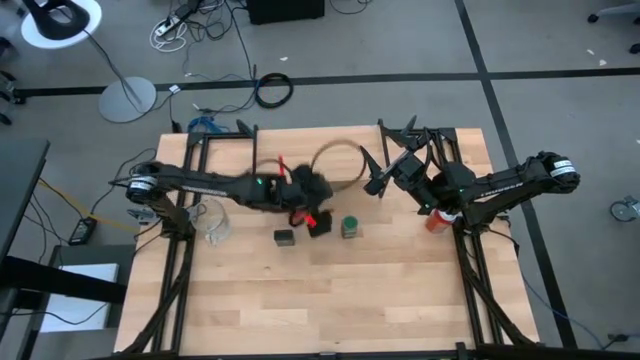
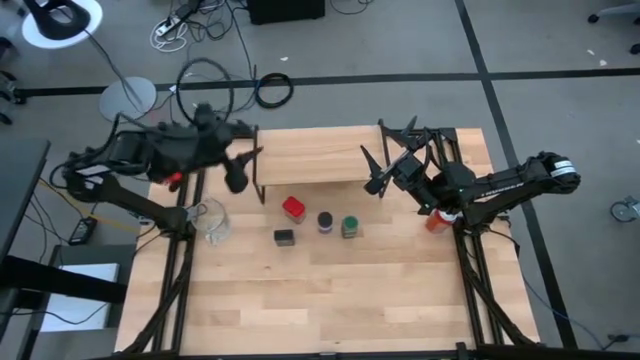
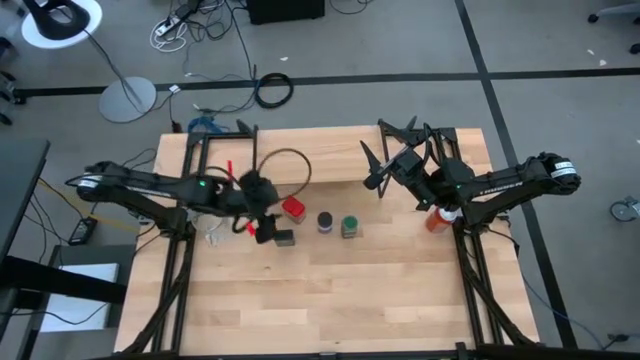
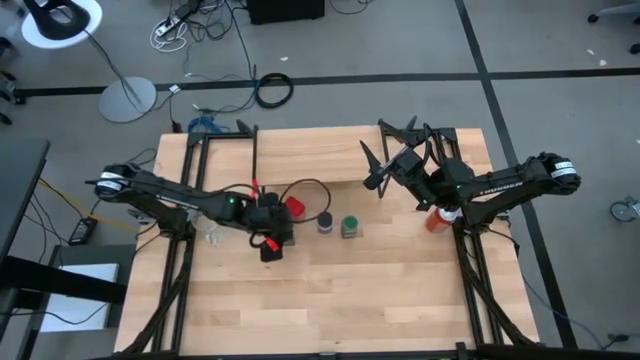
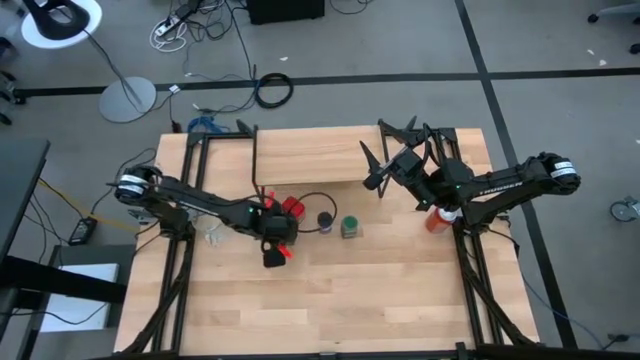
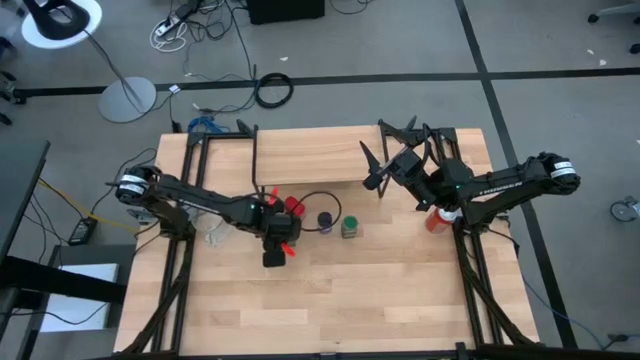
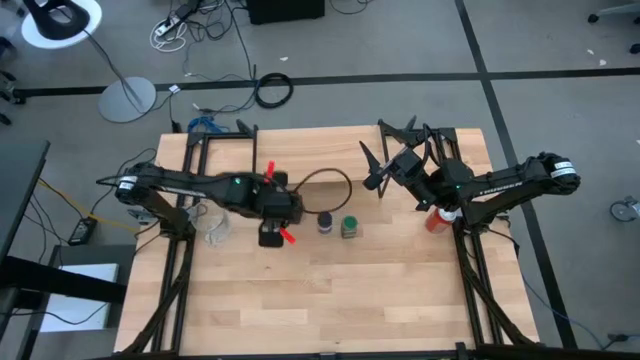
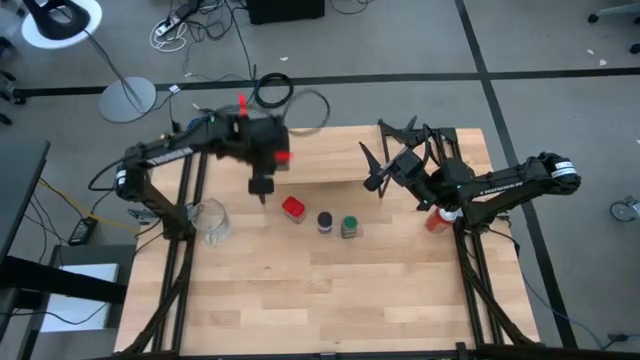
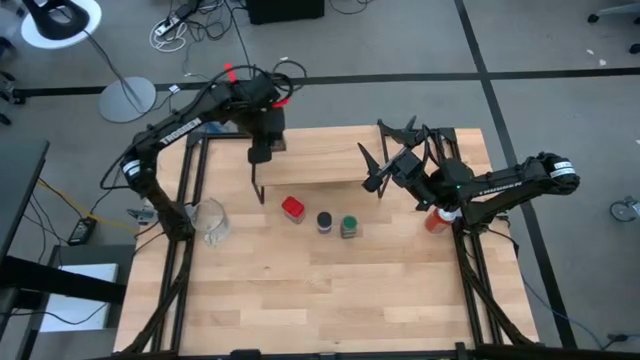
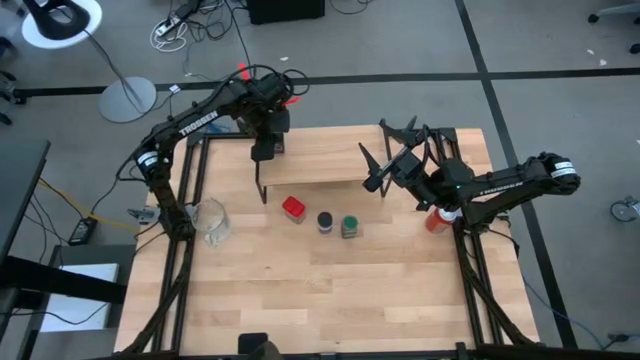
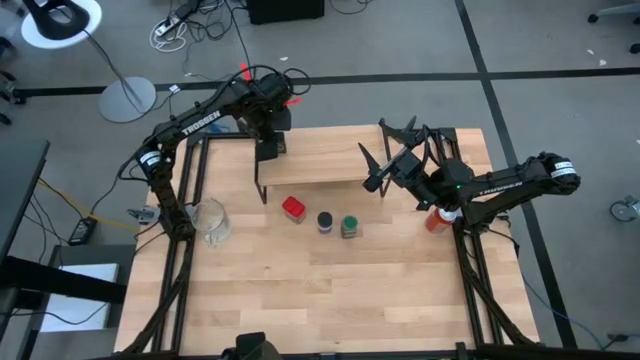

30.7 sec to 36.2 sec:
Task: Shelf spices
Put the black seasoning can on the shelf

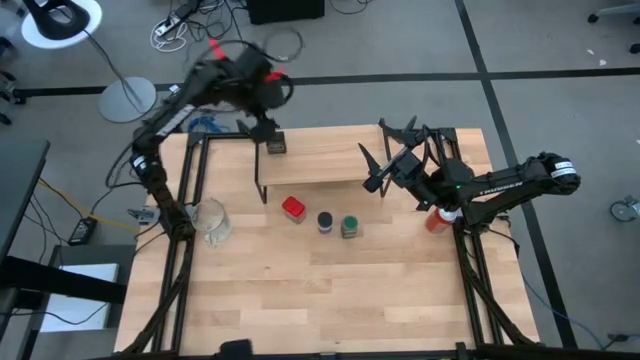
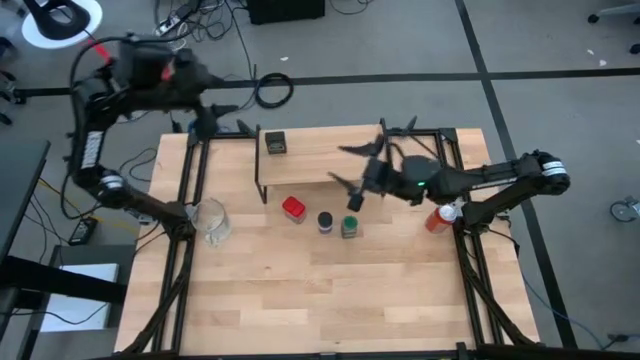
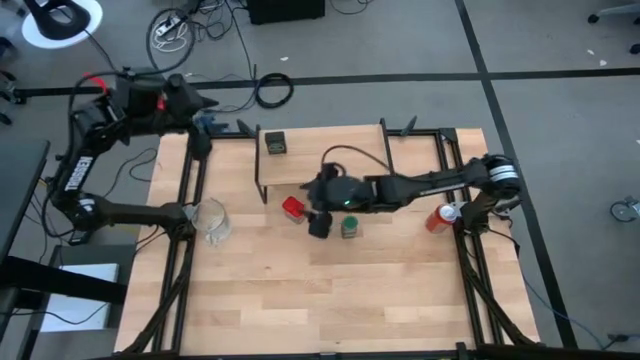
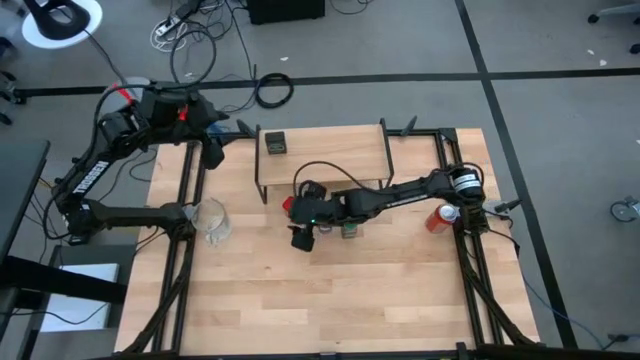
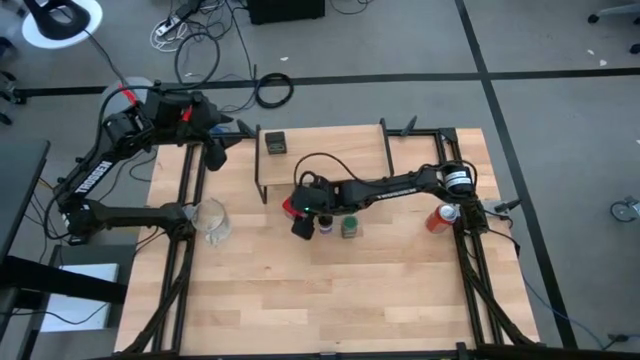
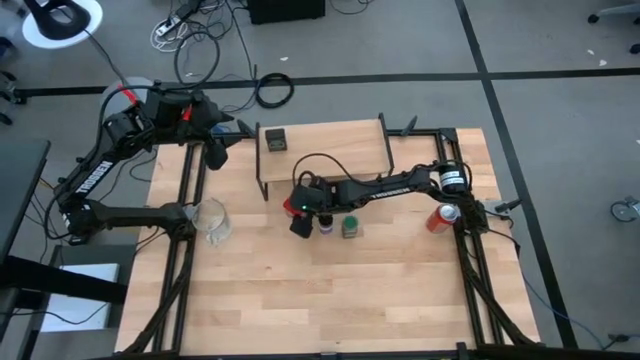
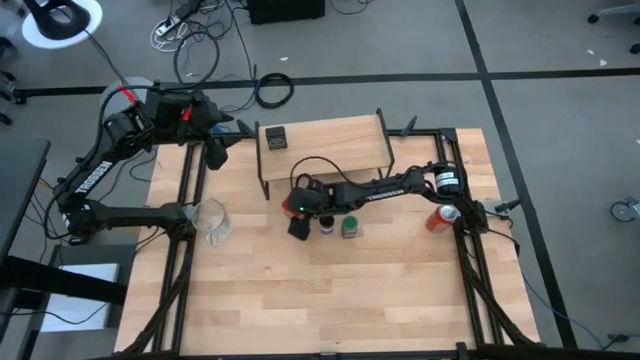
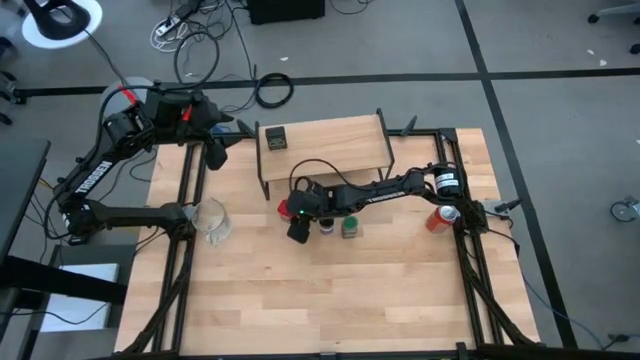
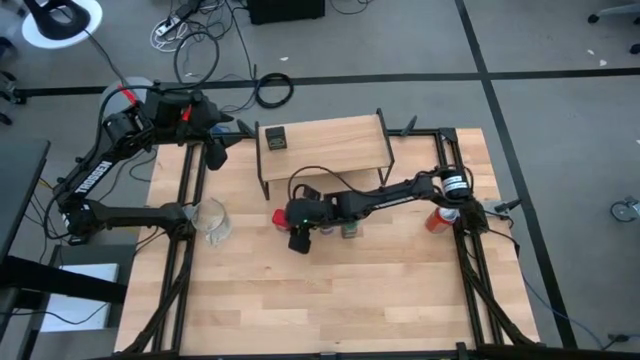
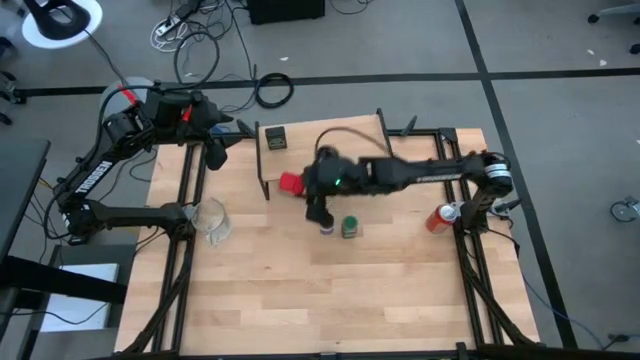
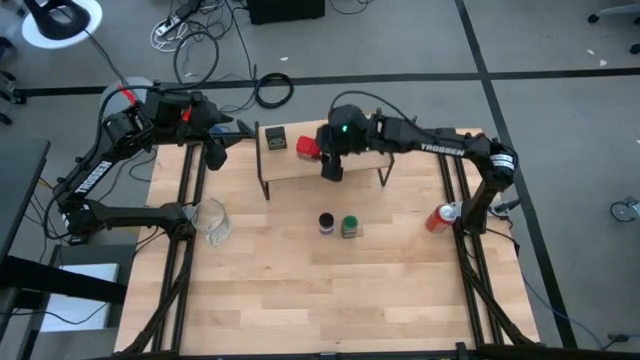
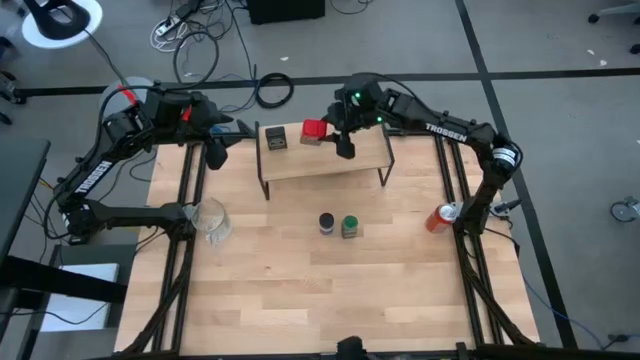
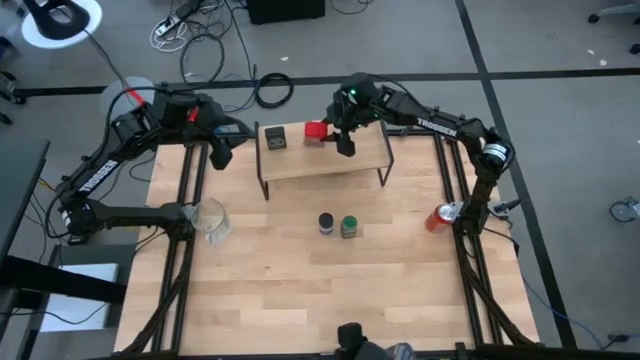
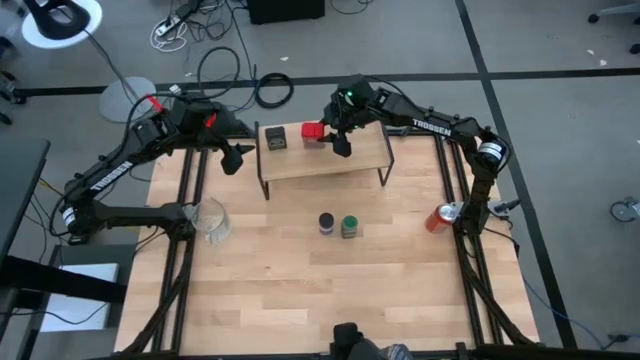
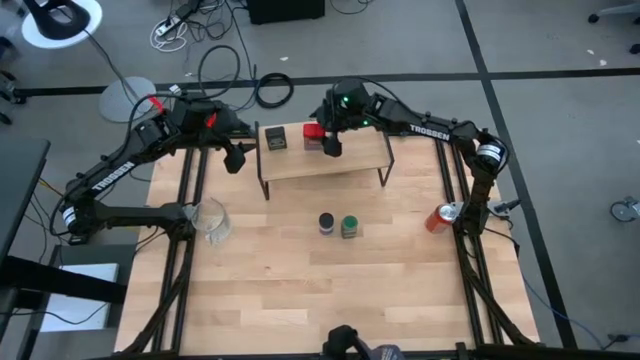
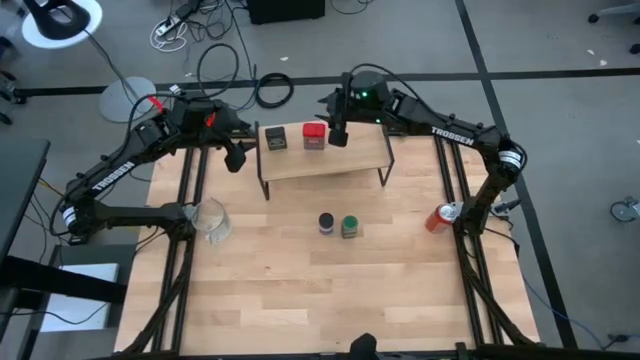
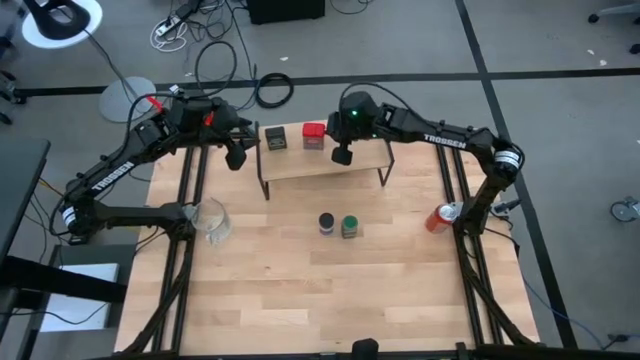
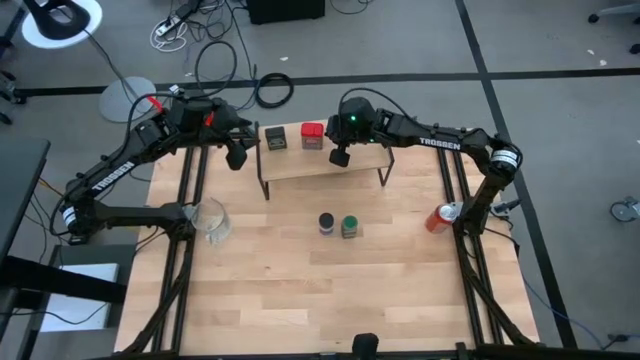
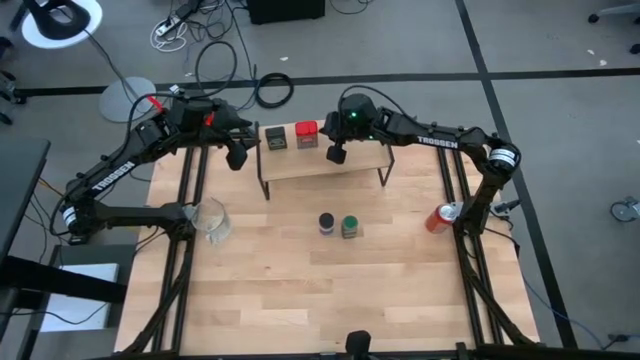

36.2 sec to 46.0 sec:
Put the red seasoning can on the shelf

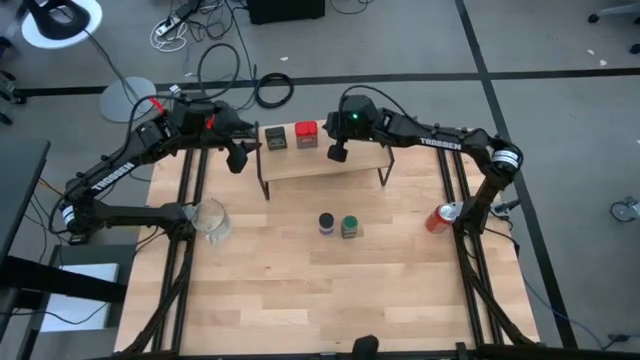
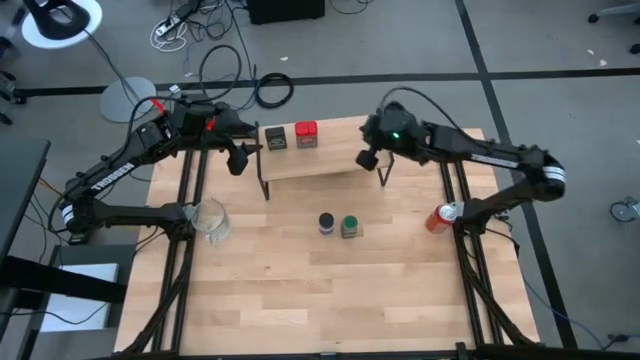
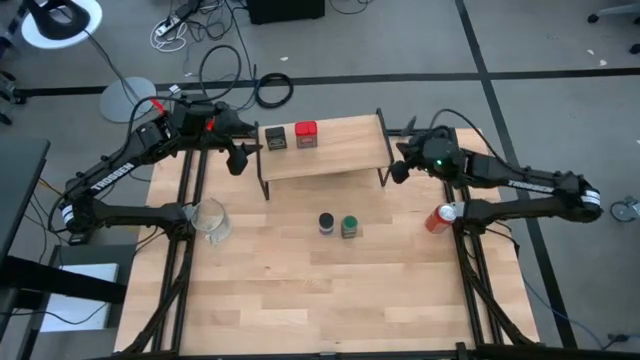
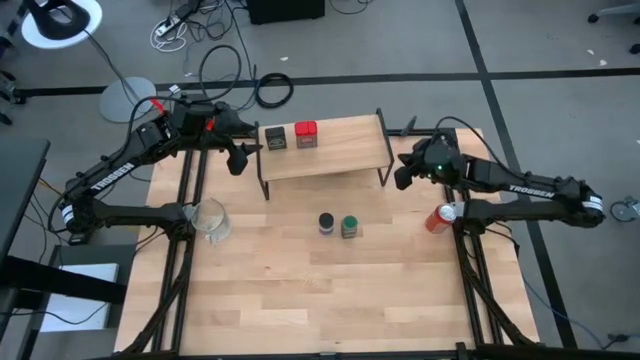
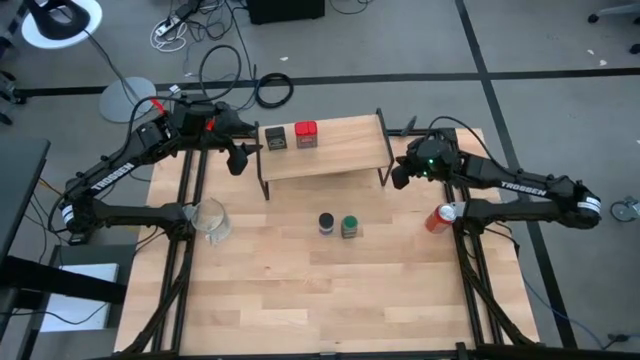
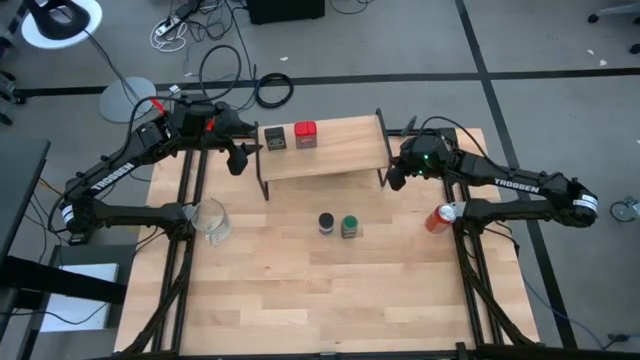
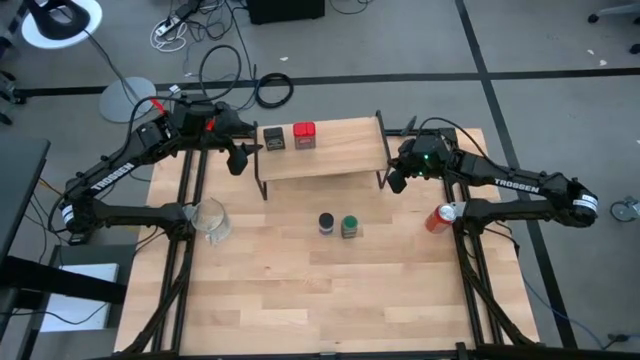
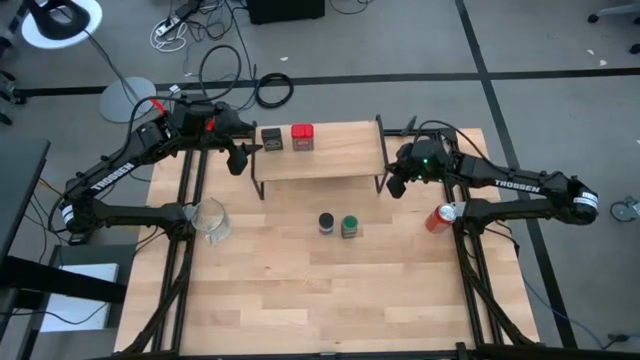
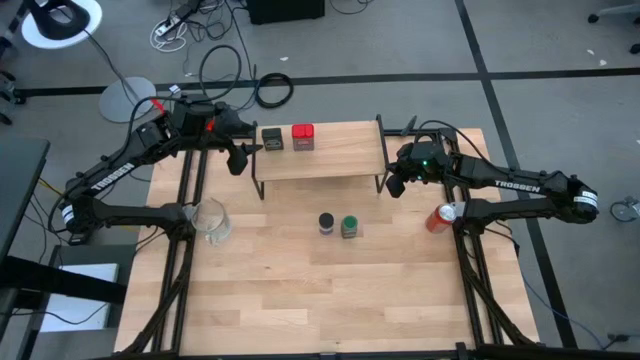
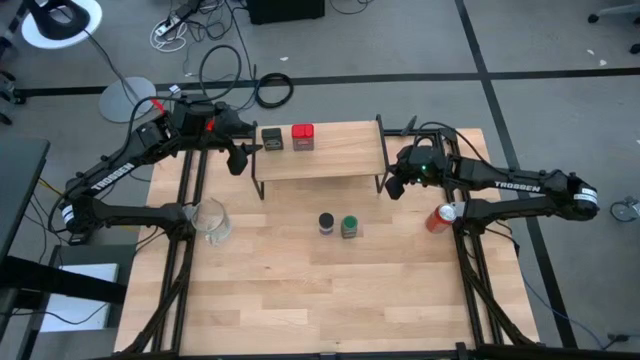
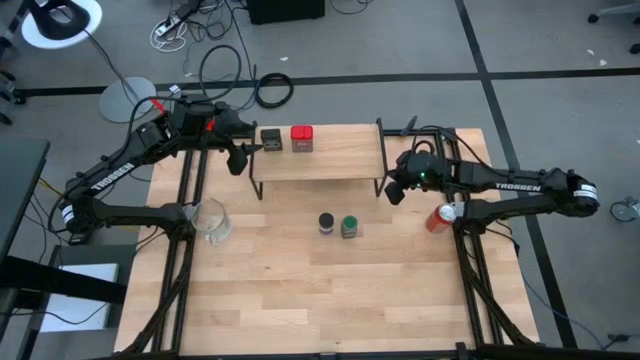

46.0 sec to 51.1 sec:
Adjust the shelf
